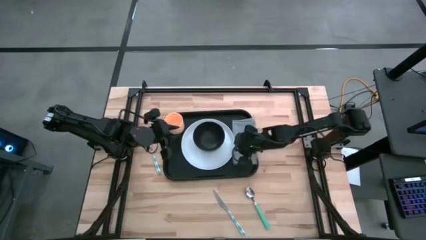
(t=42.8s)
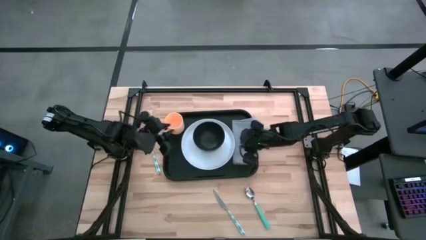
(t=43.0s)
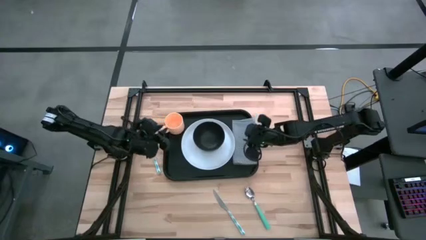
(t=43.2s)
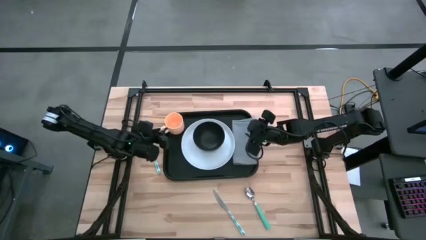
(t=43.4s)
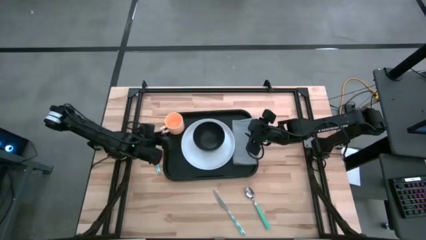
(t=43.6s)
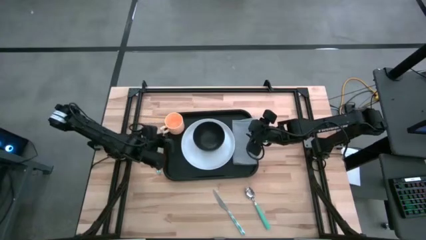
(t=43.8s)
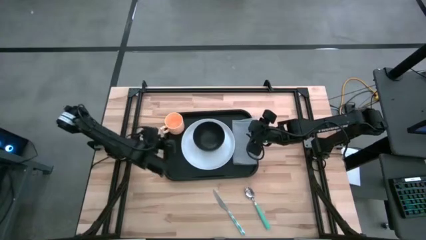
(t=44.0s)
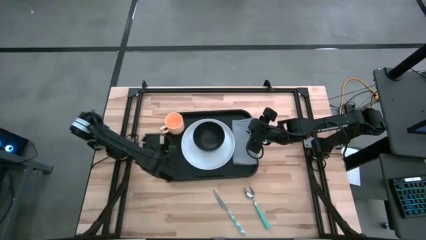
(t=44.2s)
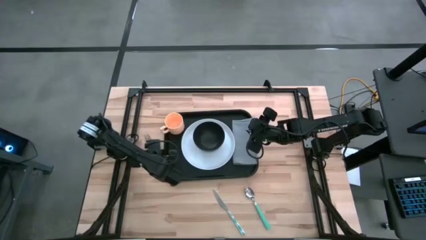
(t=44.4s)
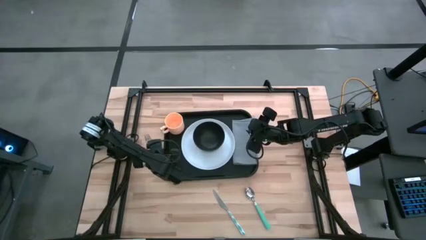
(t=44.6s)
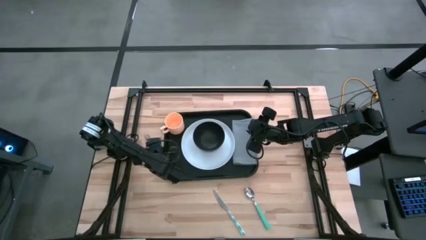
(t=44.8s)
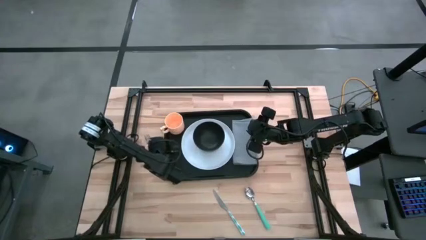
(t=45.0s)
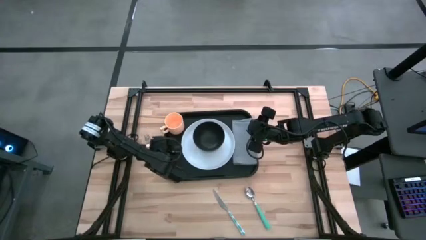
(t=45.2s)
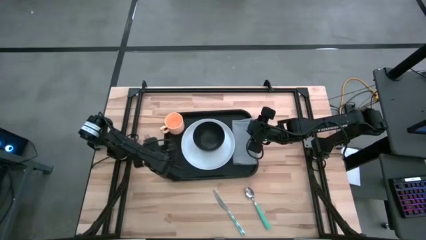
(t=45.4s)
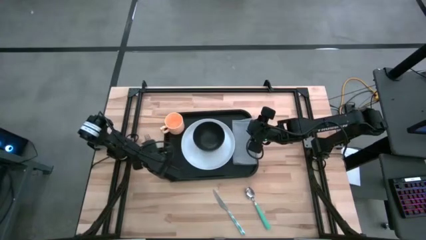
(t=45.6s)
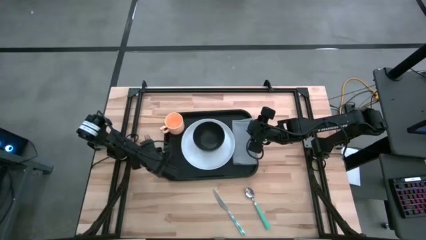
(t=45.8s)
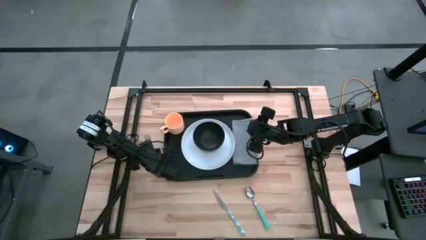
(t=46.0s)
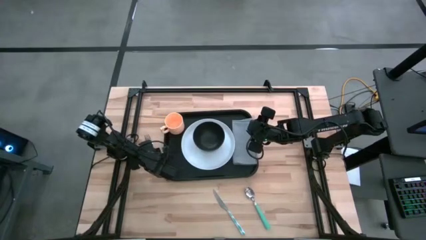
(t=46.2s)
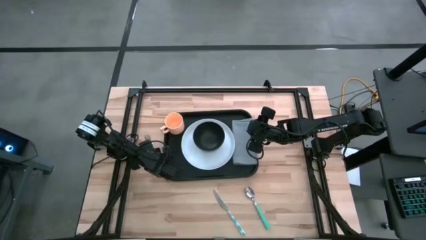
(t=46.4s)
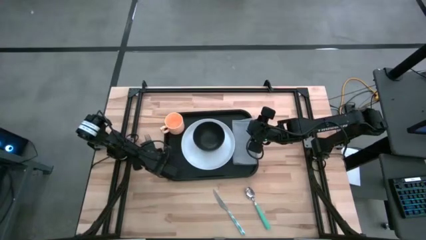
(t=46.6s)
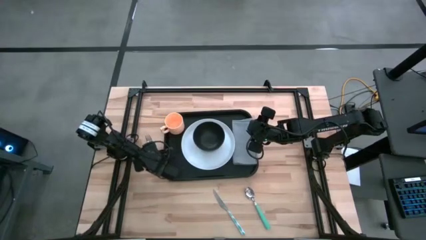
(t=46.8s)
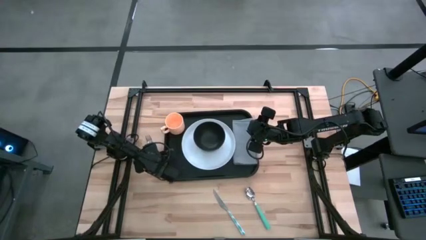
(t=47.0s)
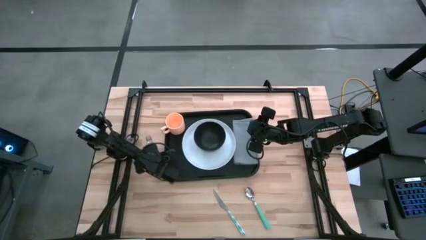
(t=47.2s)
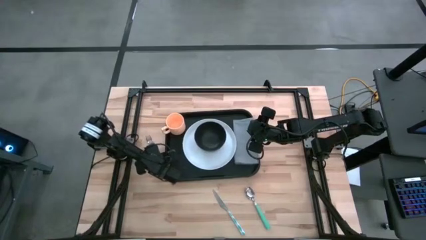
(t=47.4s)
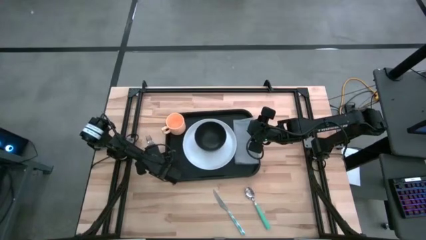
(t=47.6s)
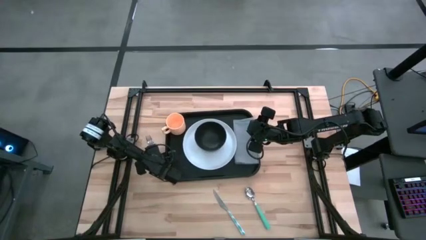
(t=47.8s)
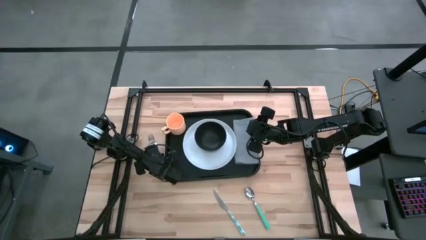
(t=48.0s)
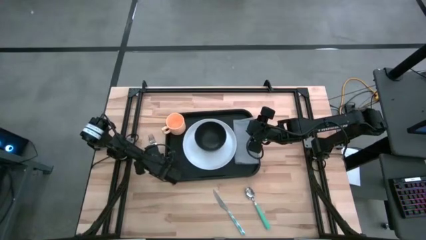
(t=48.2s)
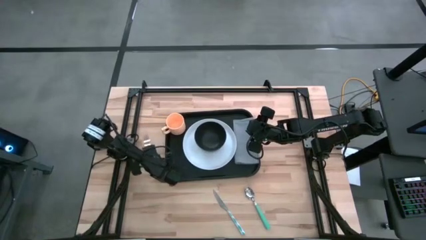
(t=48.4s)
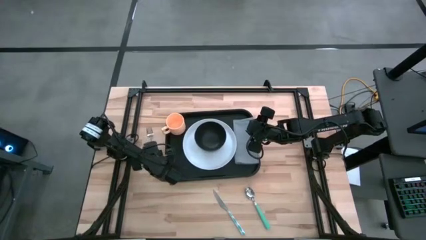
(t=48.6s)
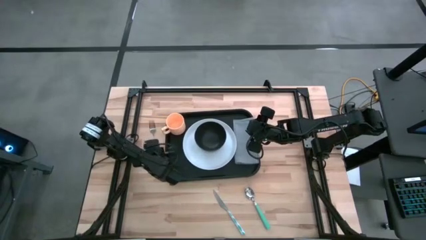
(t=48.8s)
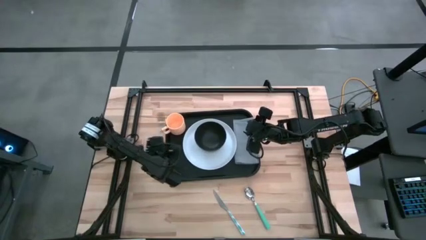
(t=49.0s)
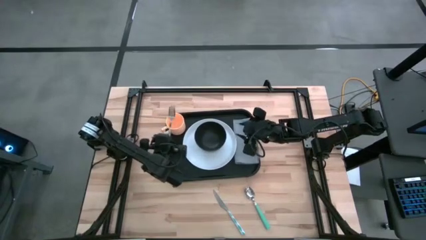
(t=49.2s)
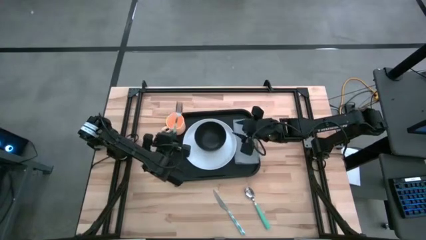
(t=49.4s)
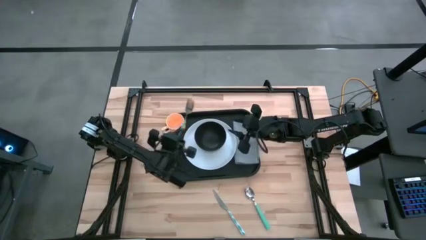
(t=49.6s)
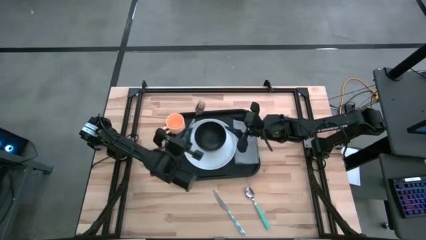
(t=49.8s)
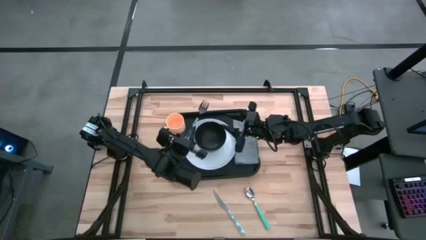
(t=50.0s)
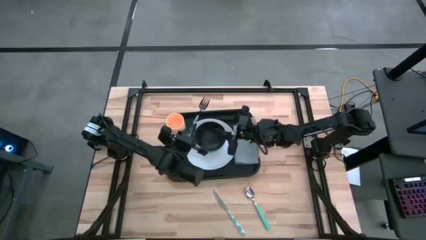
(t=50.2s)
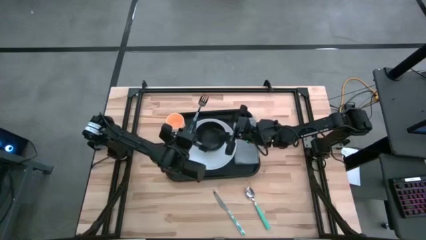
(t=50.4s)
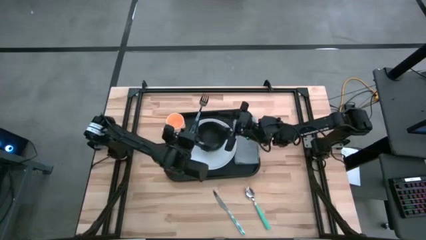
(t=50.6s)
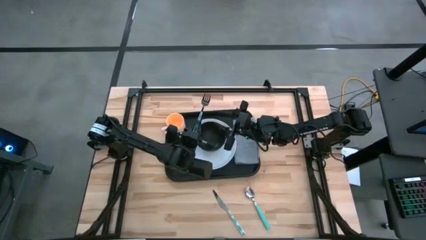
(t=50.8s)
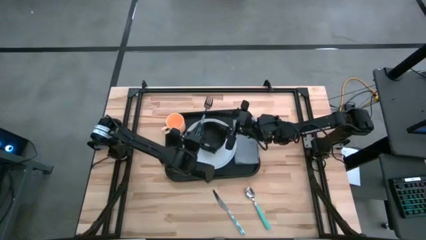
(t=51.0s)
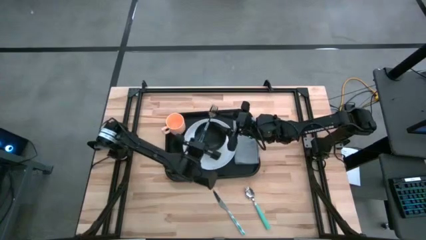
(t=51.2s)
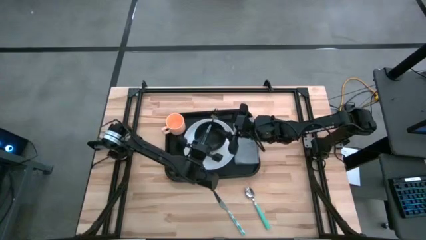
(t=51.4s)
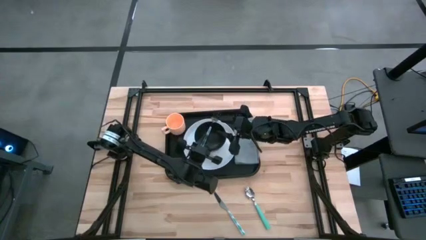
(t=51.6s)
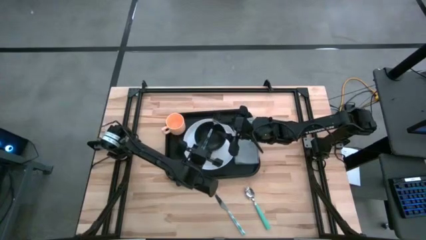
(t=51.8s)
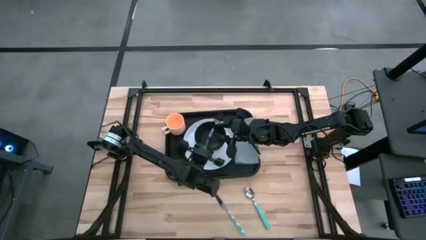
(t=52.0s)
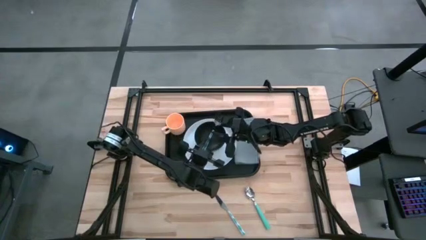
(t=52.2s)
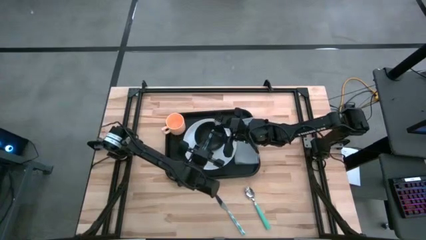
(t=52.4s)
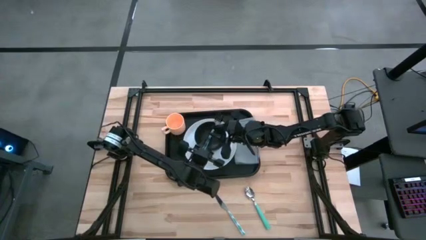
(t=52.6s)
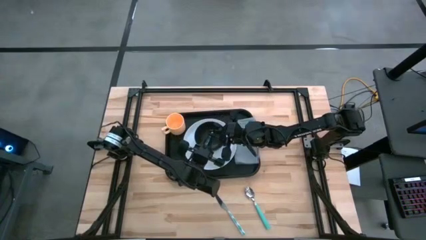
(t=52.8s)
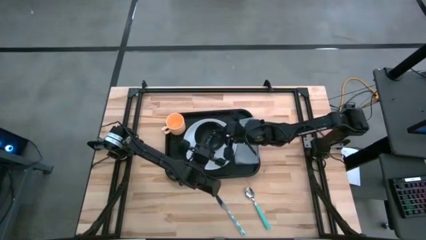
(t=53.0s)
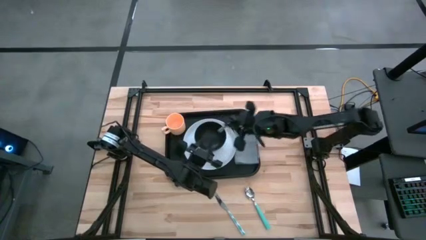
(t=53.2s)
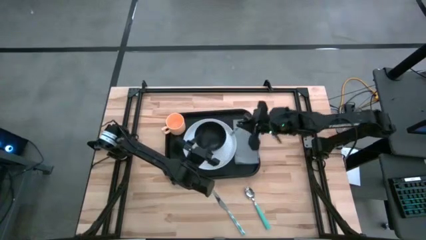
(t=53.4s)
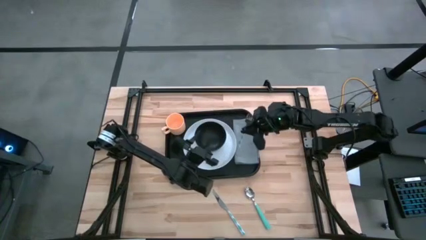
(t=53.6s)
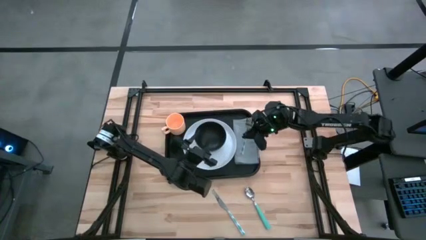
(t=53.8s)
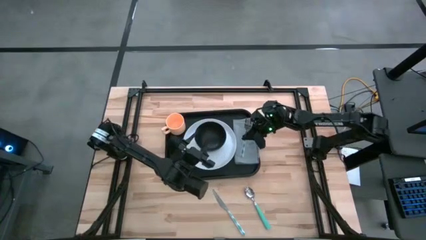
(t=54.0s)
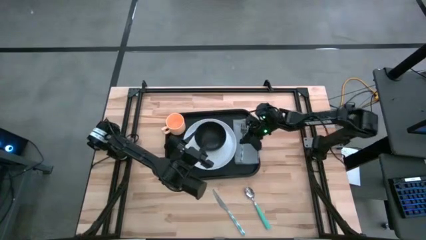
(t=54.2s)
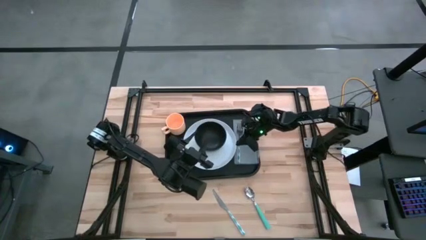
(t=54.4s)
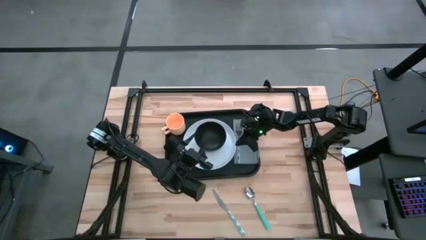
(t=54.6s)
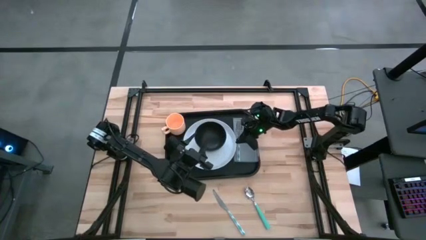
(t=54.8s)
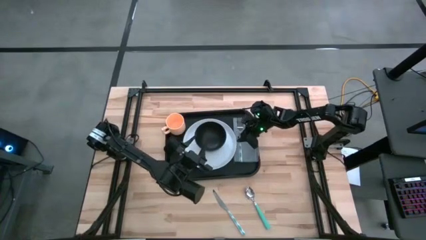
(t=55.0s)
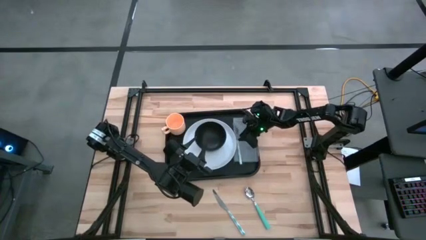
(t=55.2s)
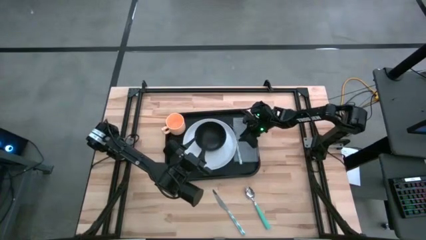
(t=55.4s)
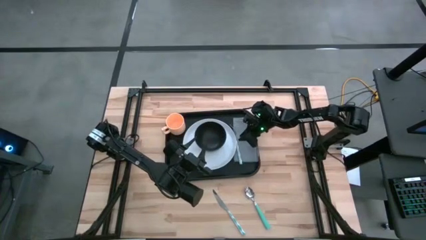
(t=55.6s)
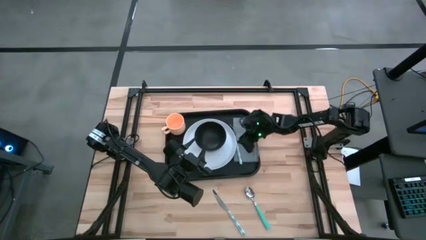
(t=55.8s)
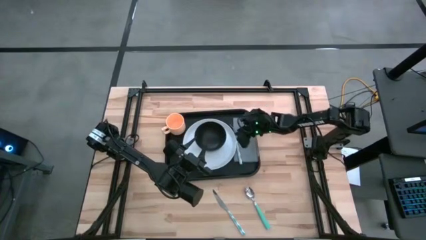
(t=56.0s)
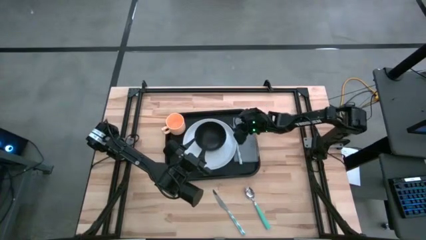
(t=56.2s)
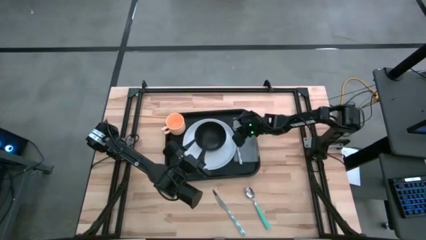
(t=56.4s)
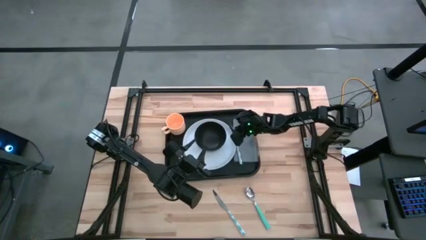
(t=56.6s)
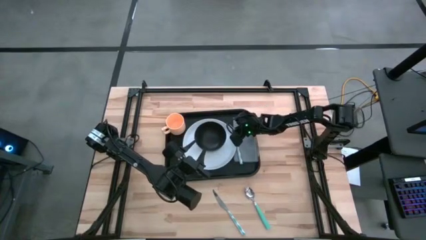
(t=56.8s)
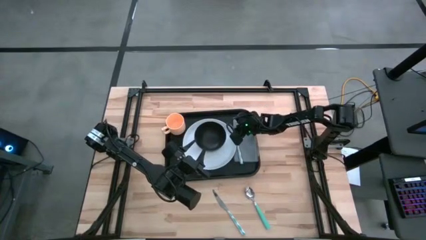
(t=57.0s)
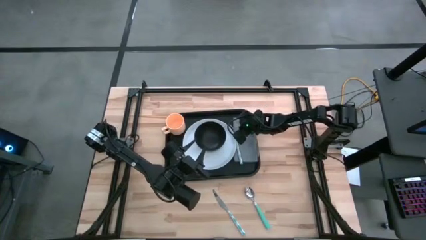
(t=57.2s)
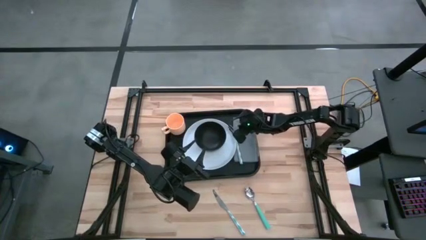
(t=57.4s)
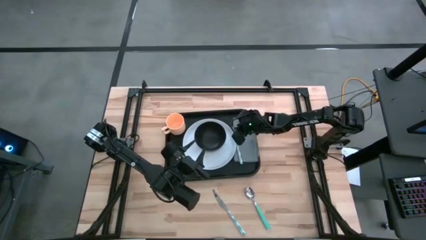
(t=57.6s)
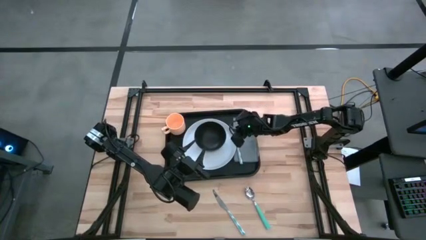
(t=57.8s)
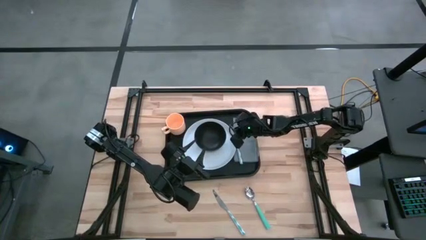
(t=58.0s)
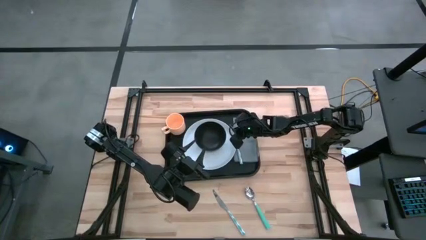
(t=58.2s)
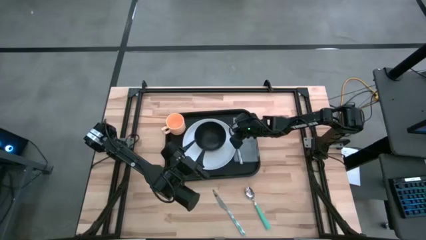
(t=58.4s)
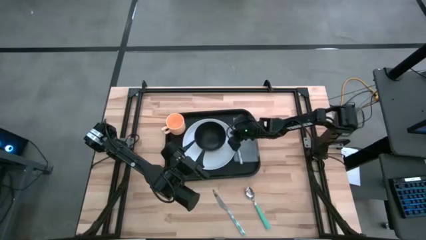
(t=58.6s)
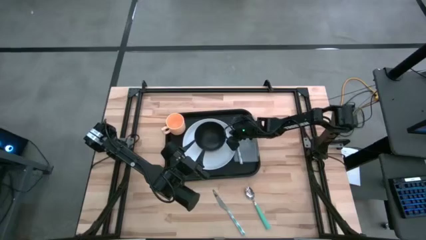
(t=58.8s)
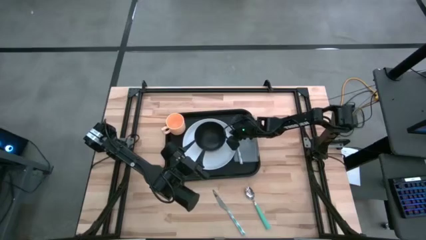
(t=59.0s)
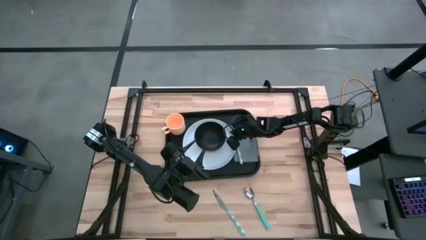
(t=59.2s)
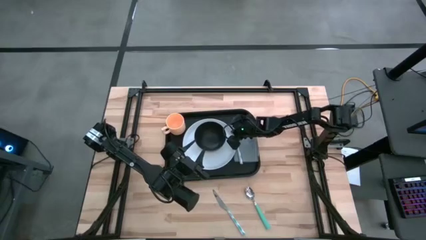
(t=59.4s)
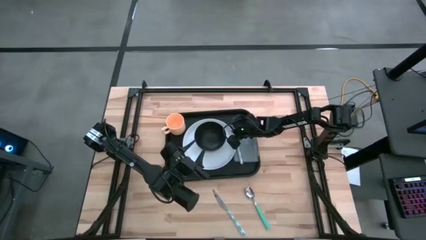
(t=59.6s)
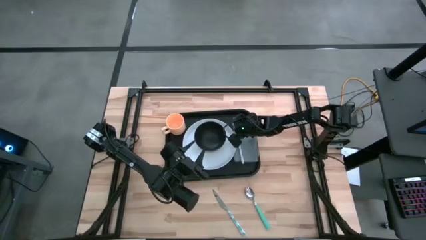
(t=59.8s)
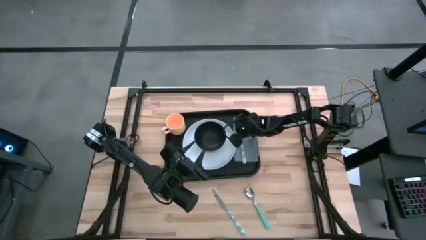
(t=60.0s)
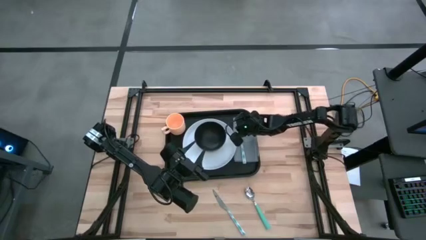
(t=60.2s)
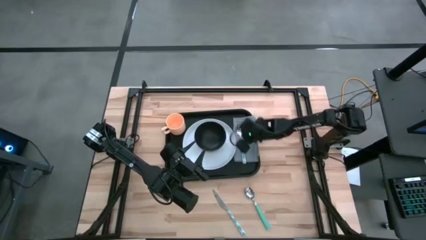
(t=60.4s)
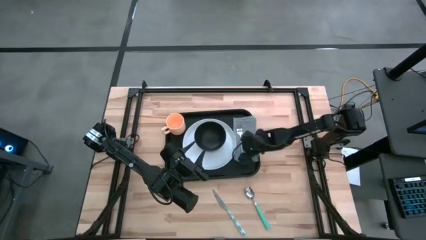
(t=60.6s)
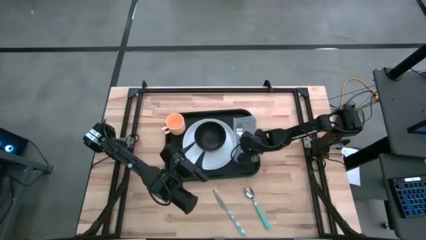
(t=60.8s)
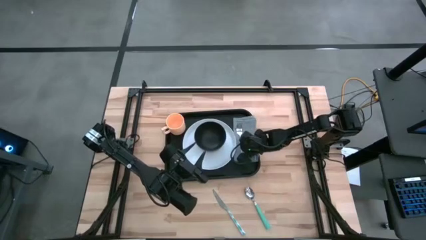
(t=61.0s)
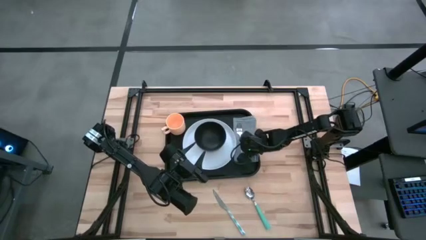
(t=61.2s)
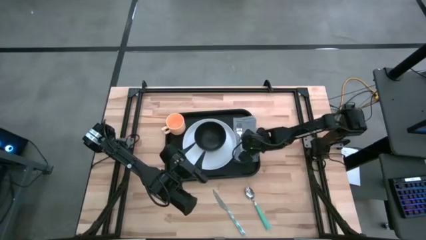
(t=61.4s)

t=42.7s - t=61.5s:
Task: Set up tray
Put the green fork on the gray napkin
